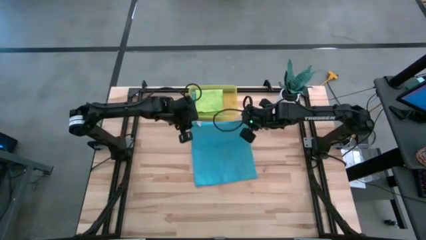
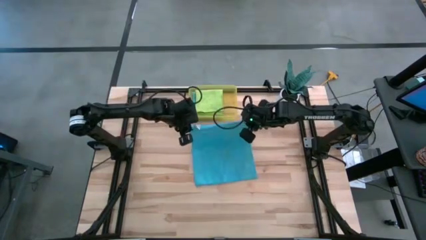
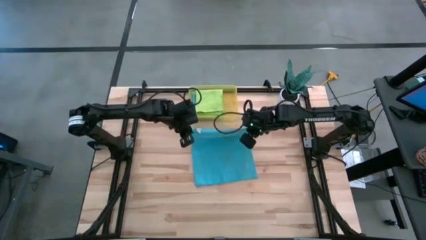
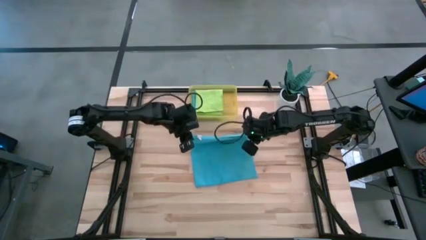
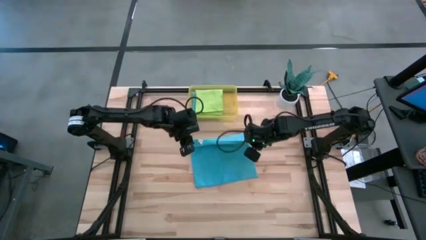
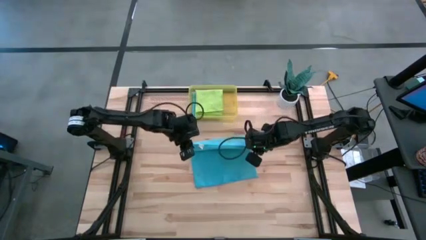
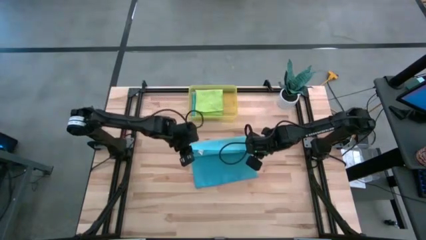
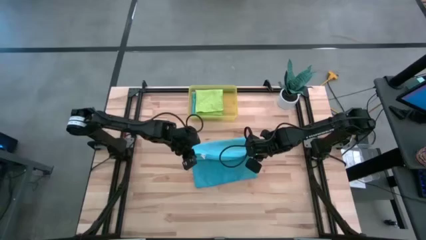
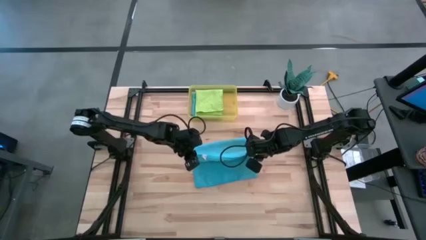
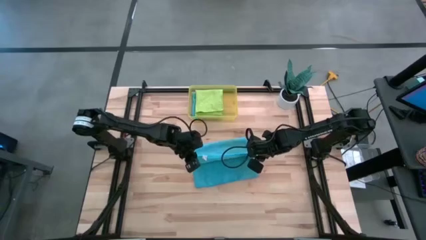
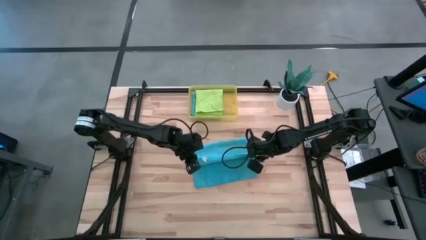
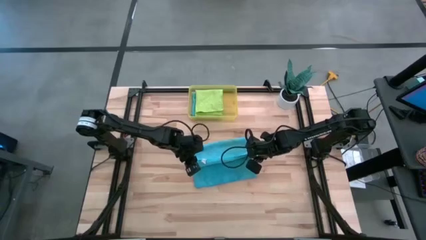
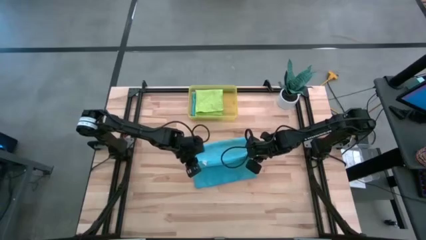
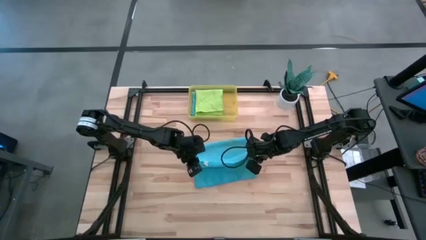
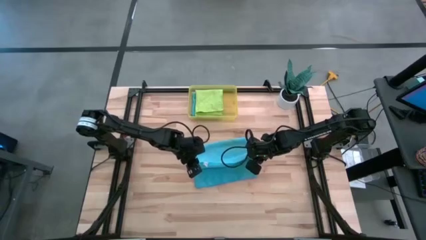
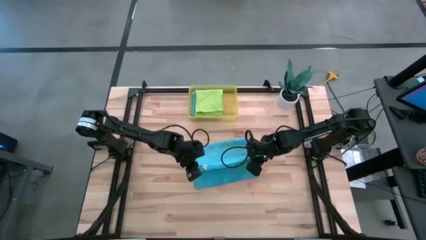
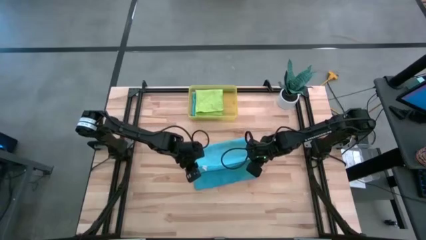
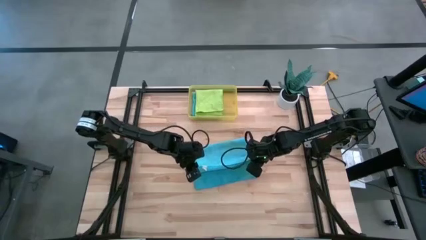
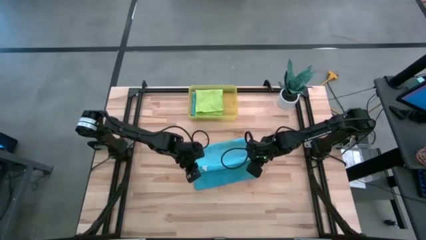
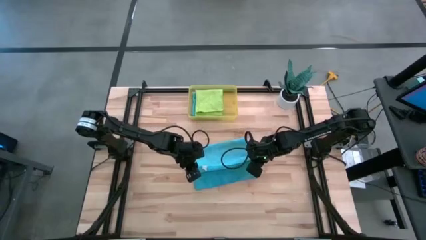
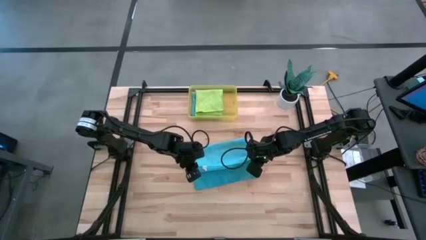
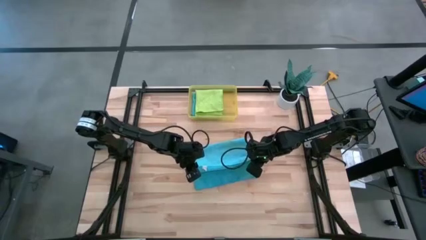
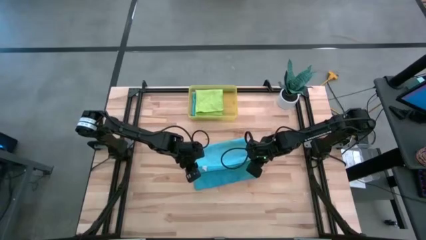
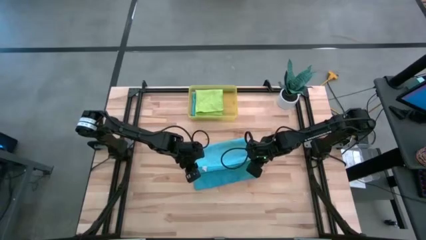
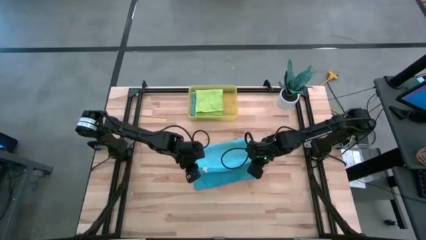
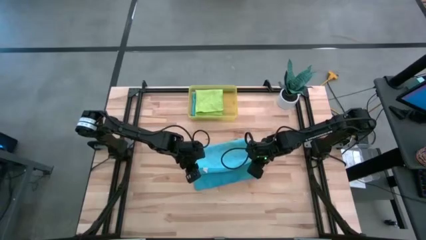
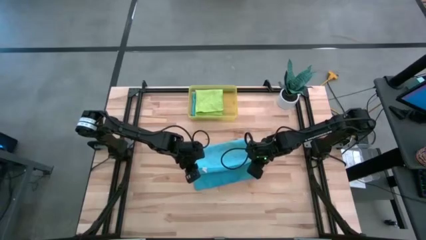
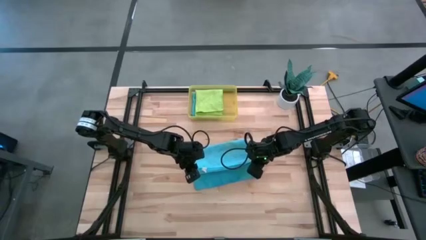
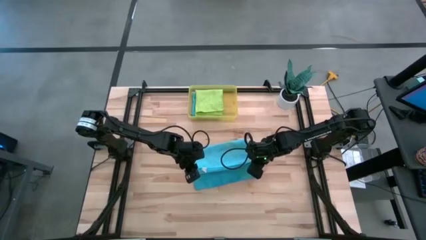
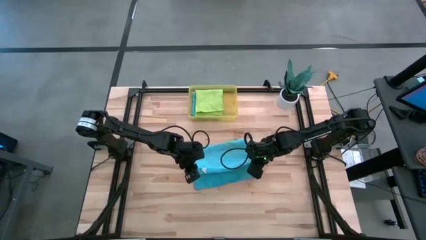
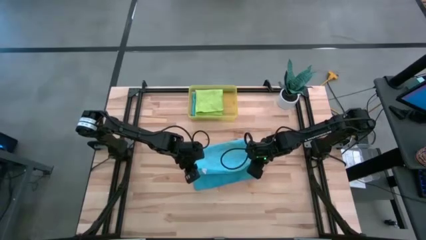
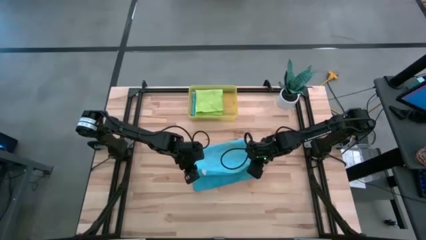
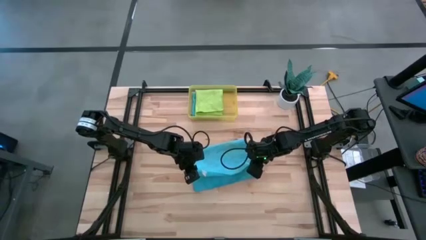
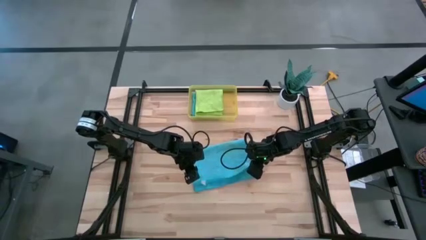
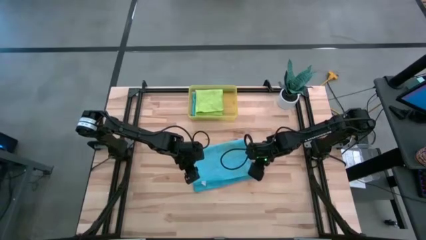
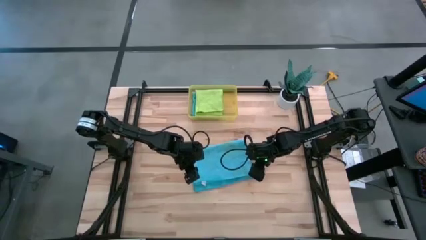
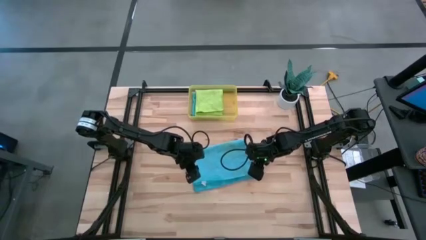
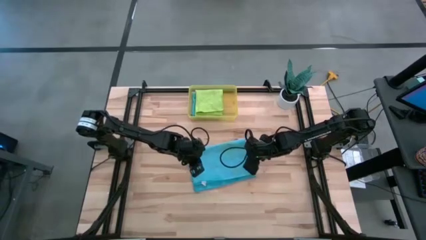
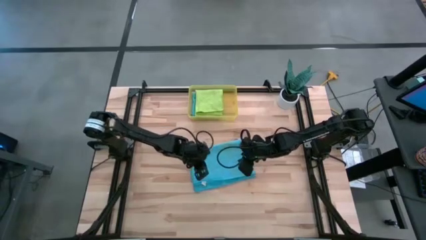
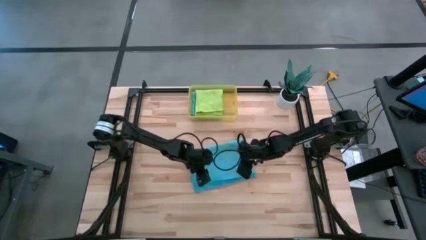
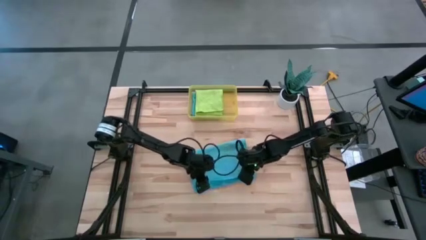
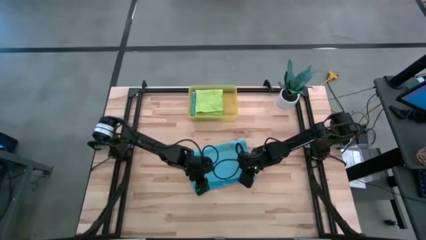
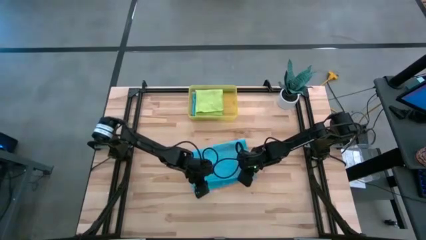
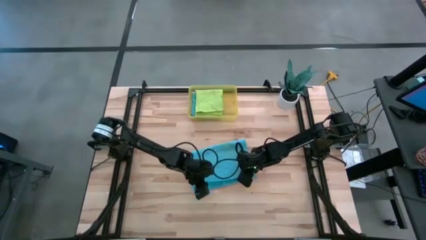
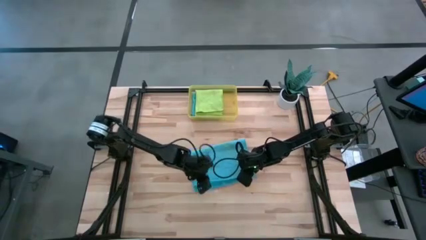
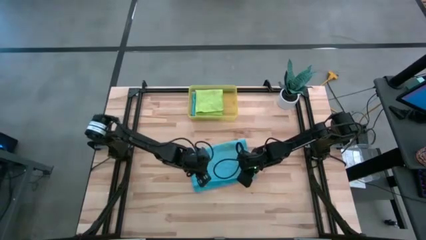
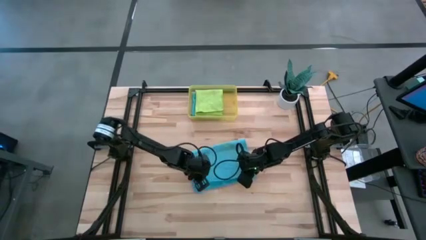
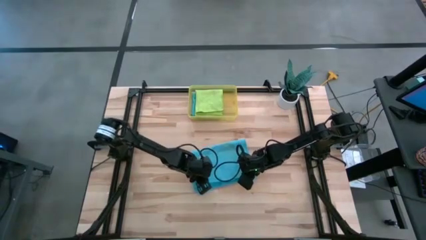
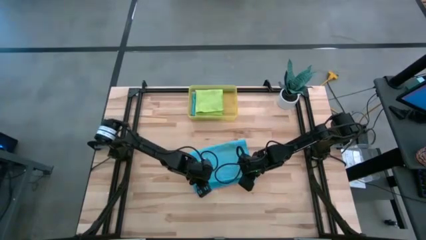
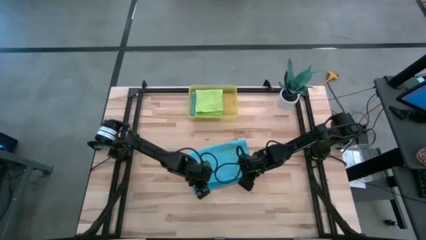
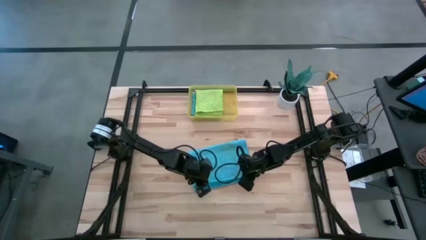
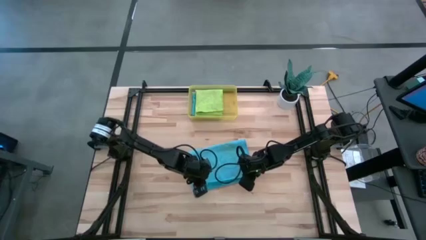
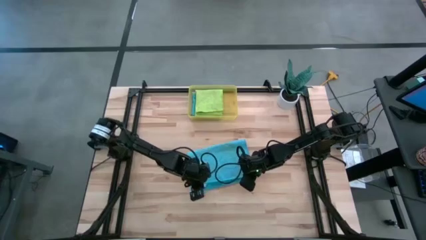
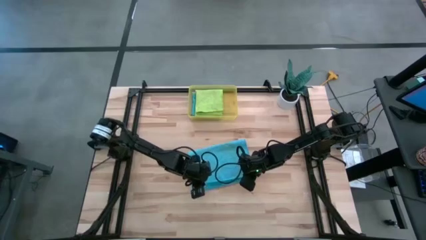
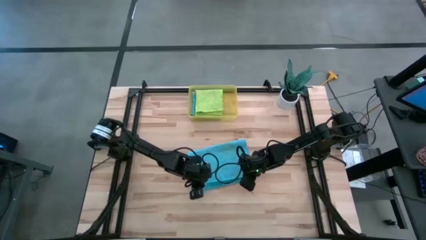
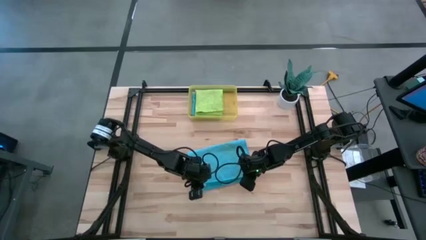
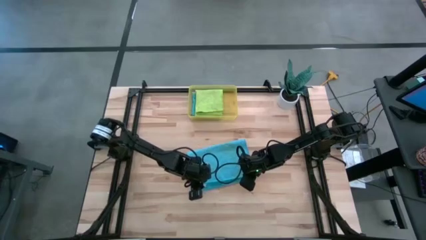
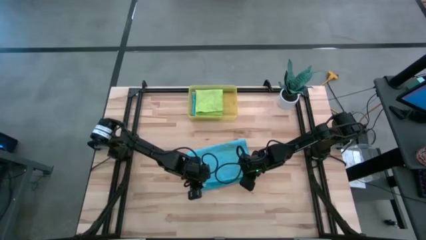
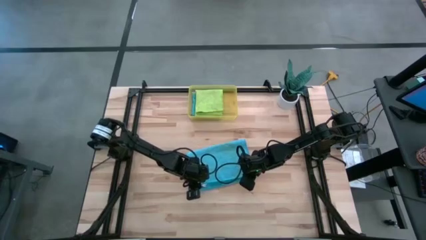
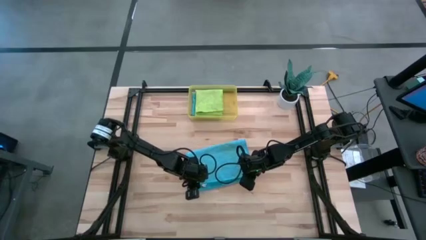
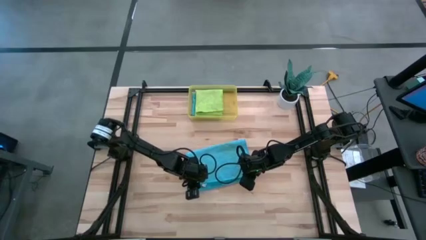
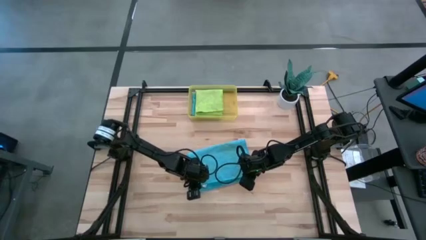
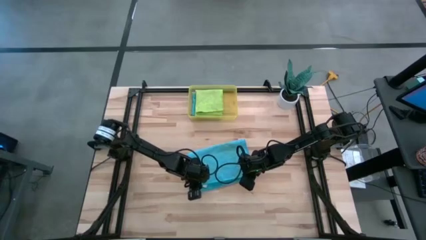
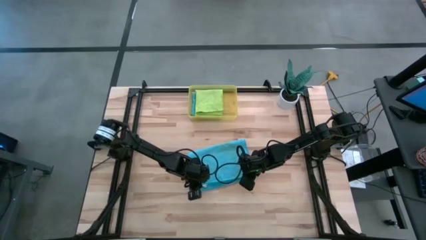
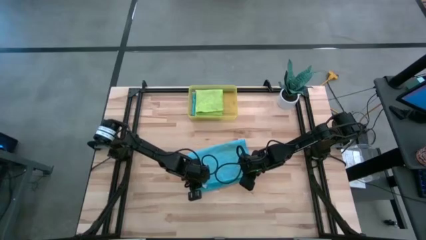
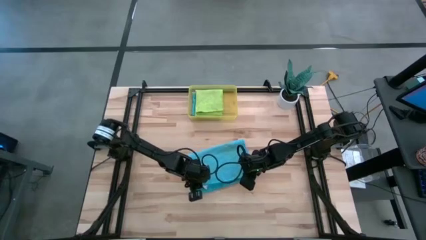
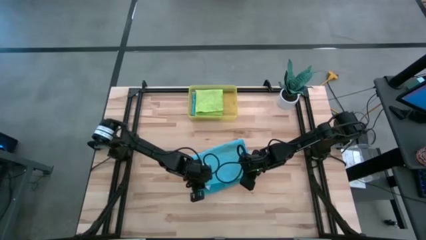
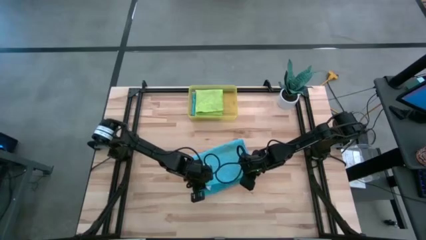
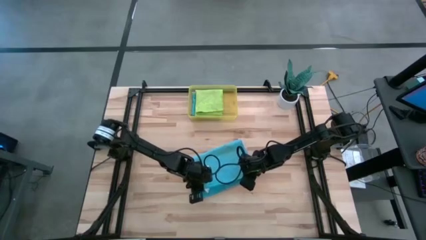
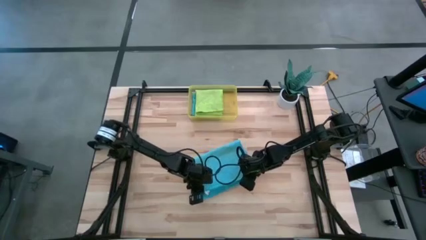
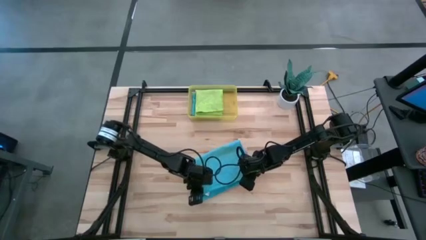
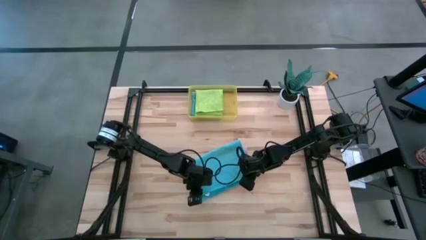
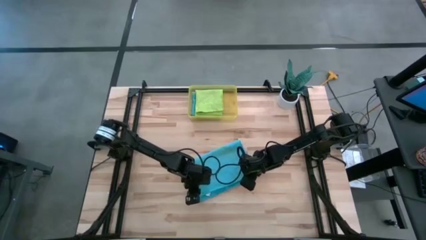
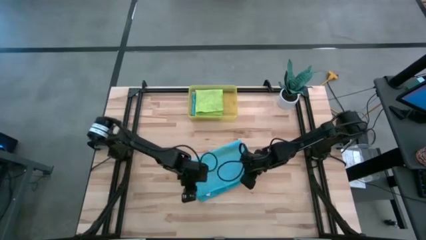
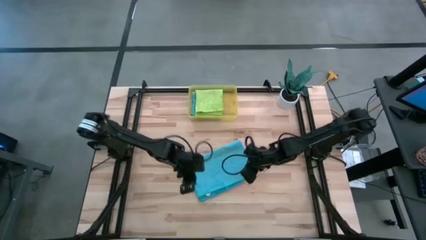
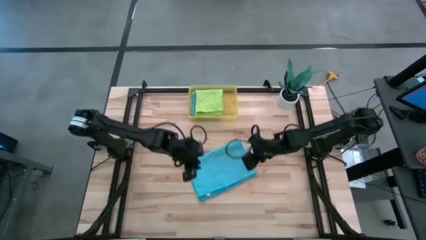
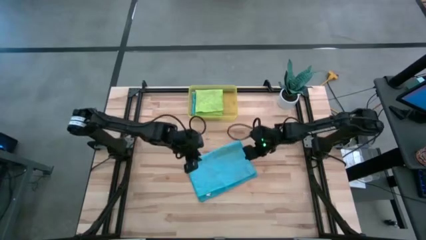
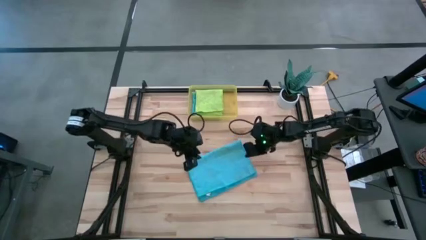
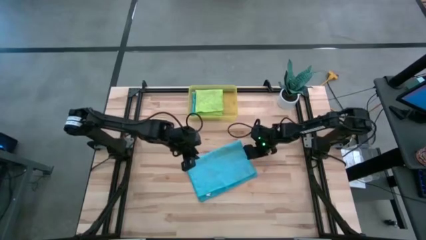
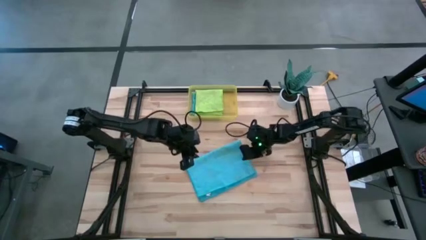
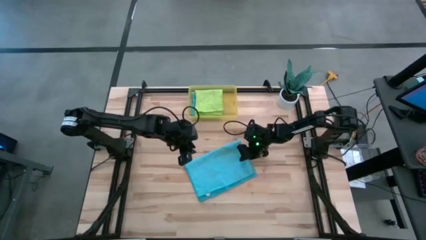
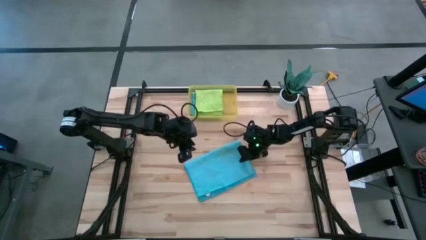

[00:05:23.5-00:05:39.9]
Task: Fold microfiber towels
Fold the blue microfiber cloth

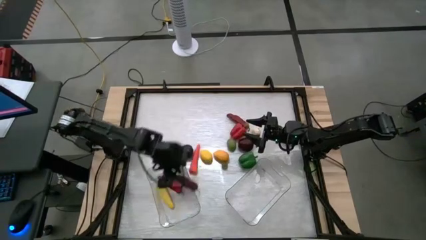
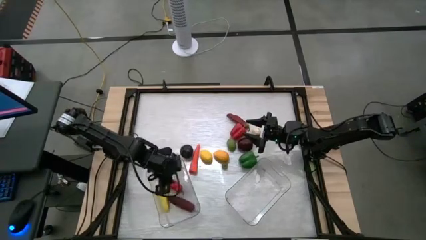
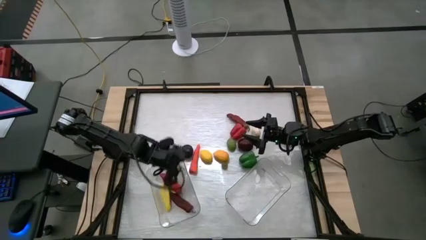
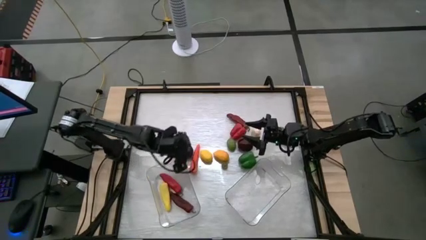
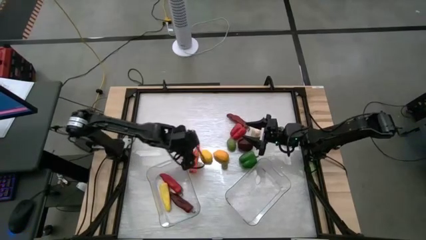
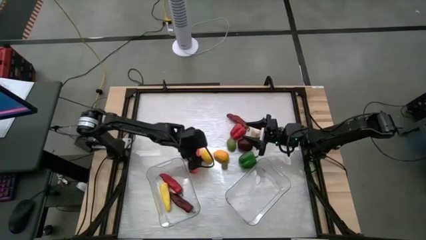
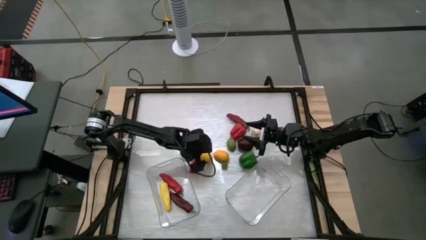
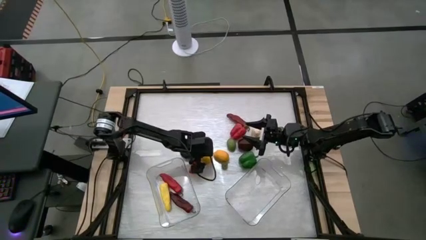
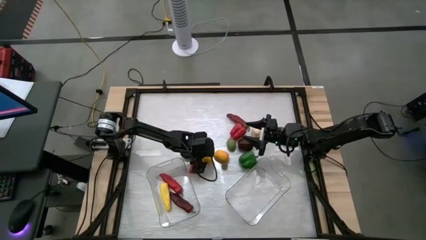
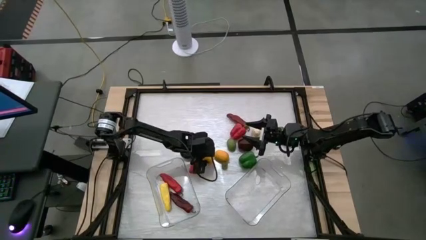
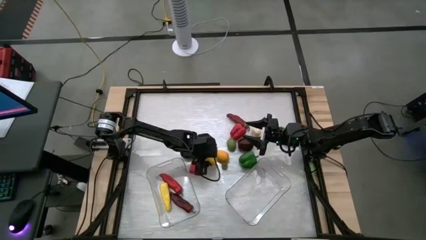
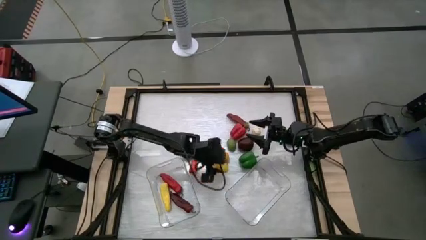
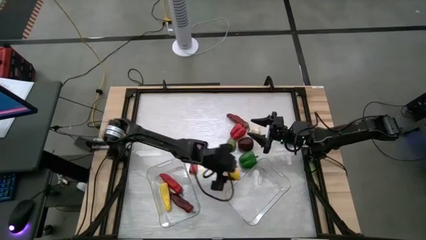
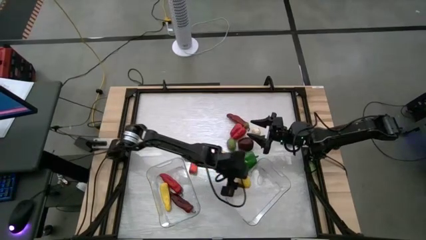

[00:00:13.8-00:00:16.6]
Task: Sort produce into baskets
Put the lemon into the right transparent bin
